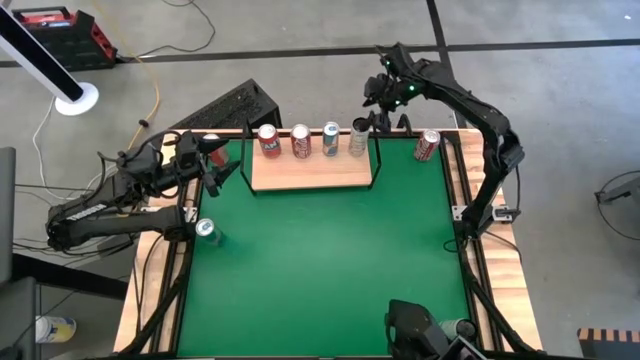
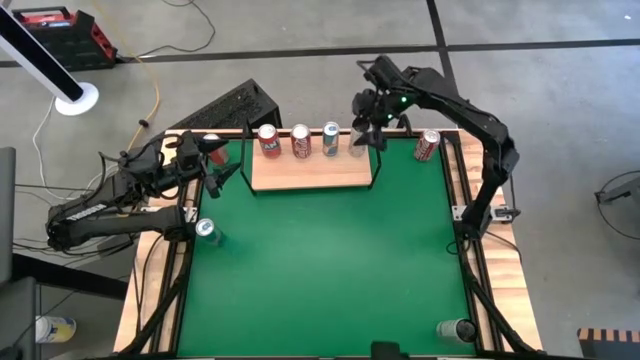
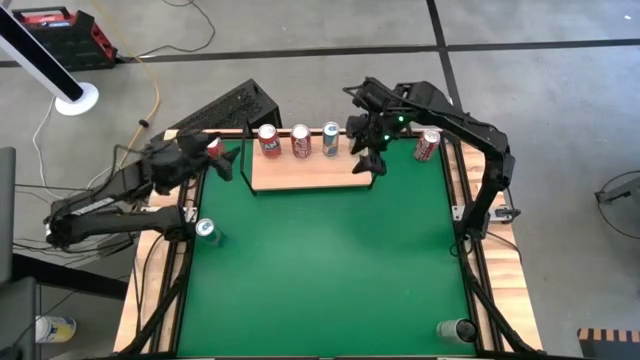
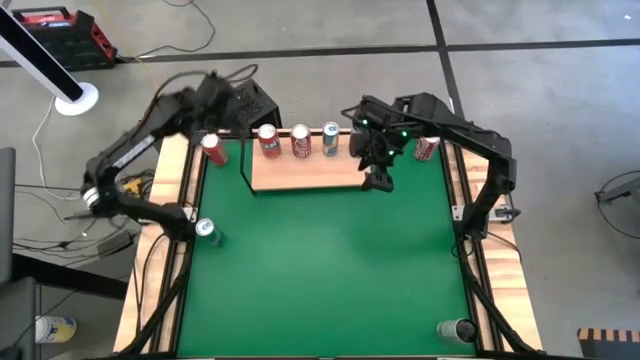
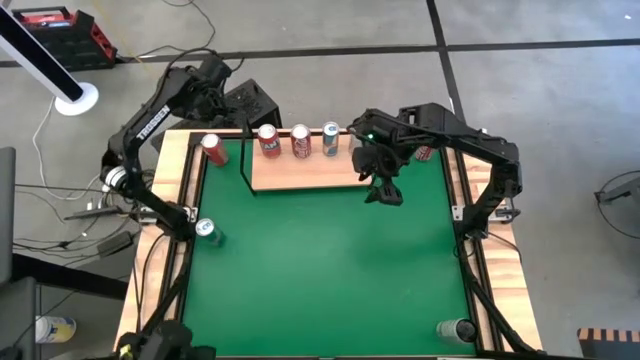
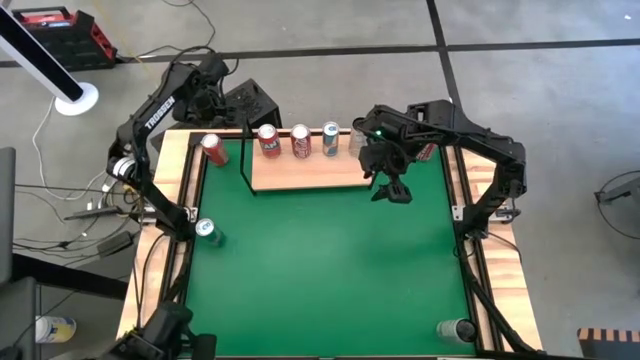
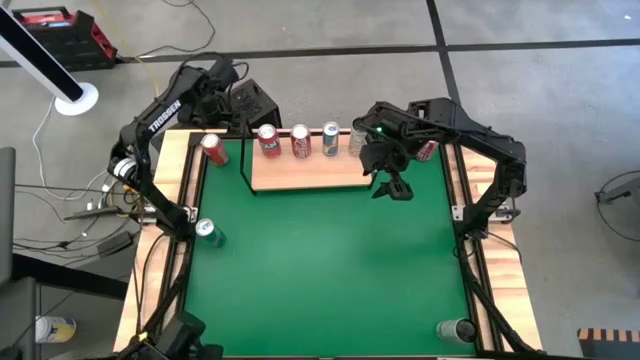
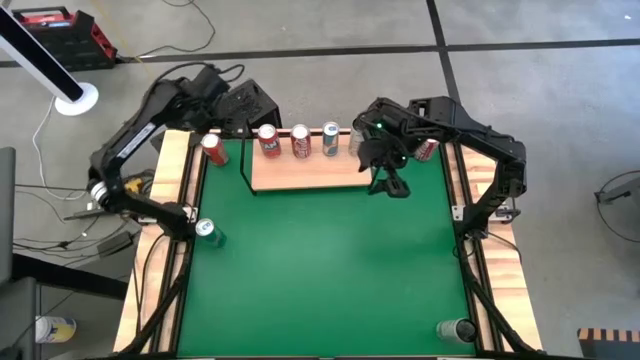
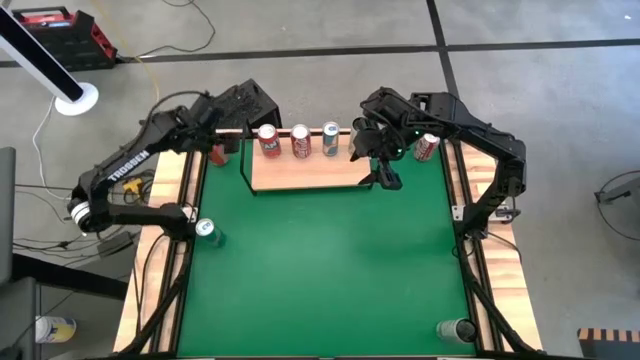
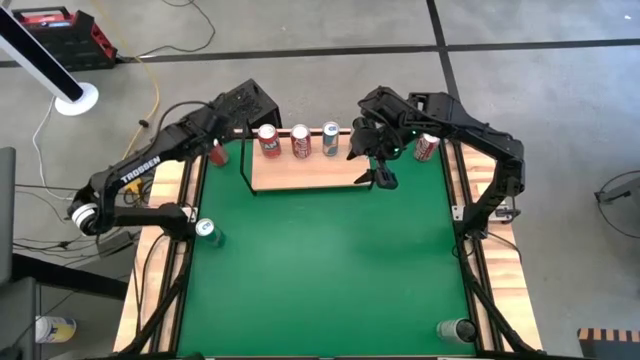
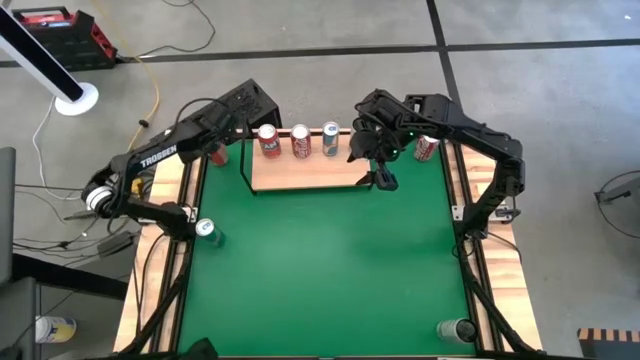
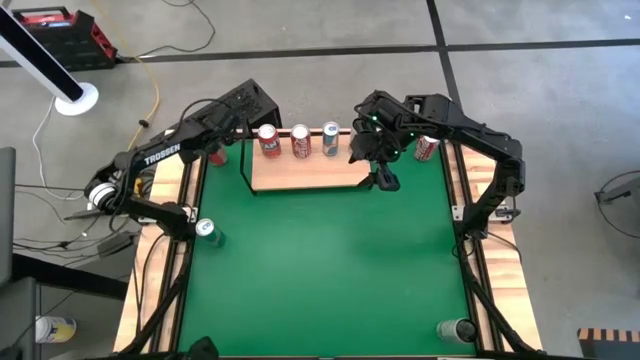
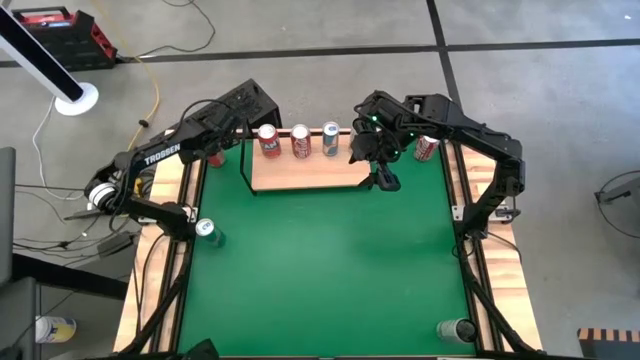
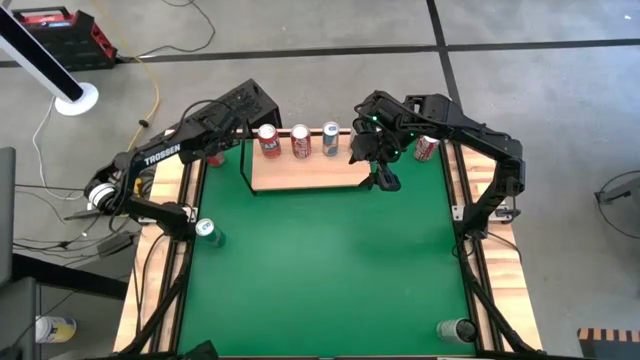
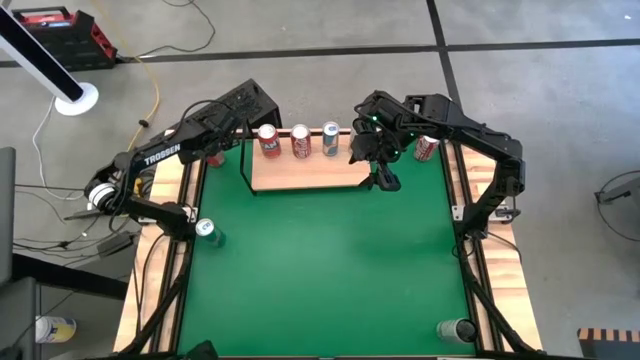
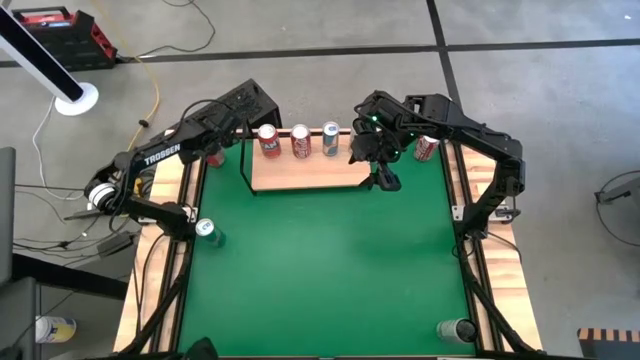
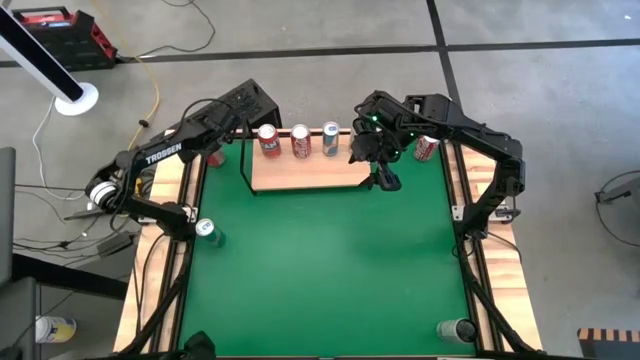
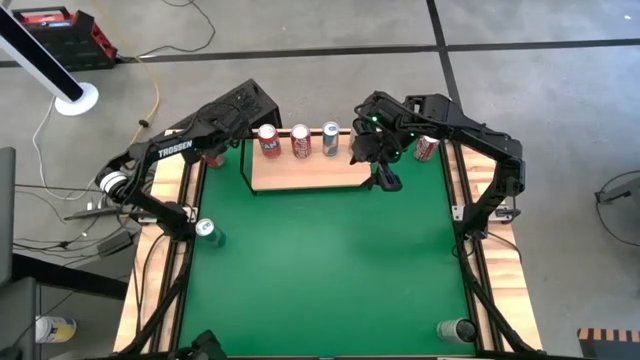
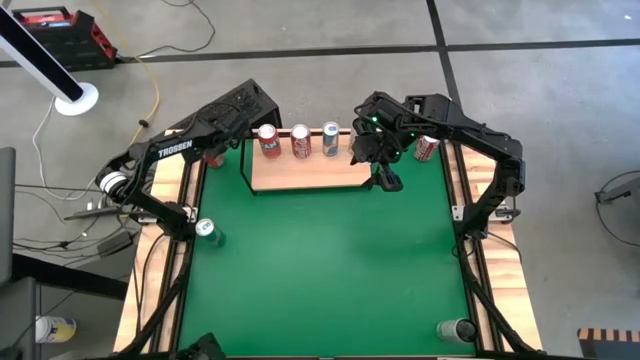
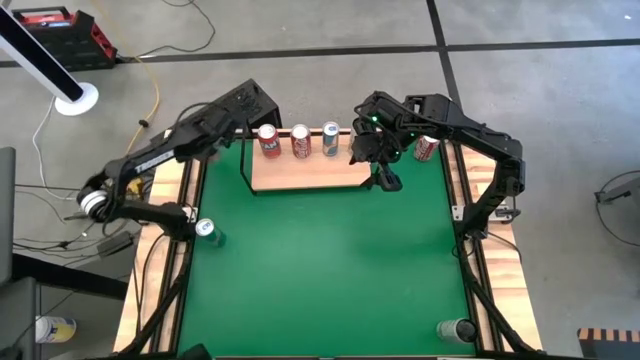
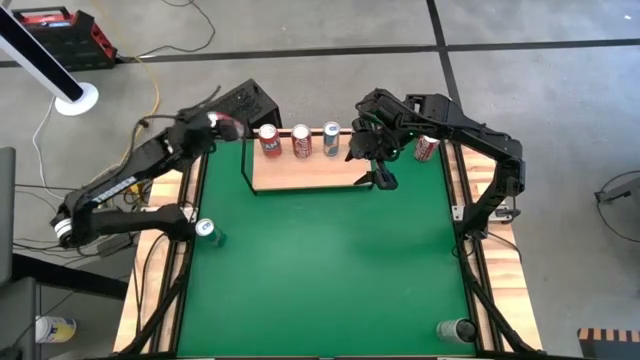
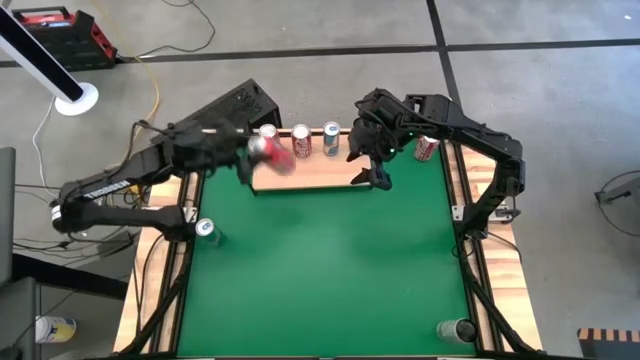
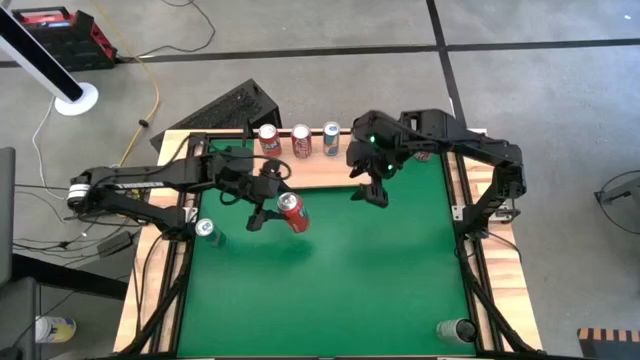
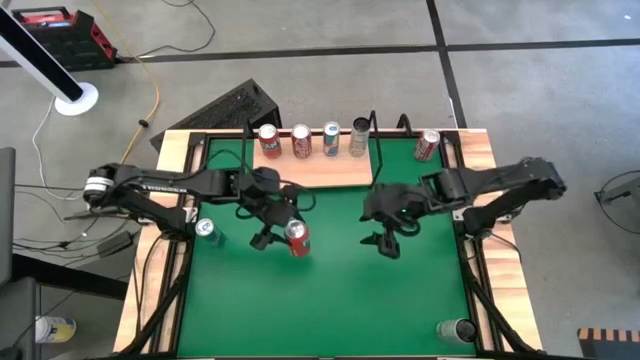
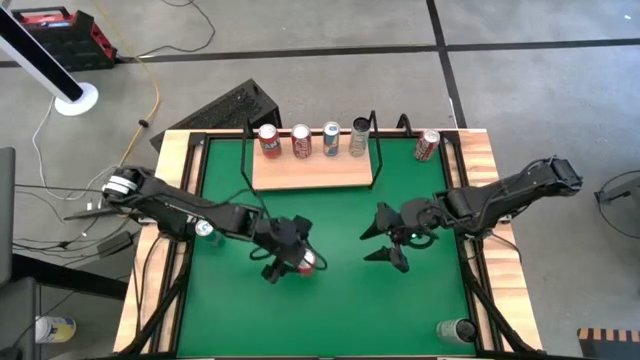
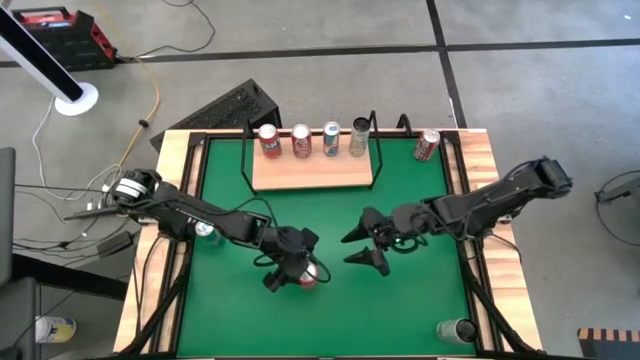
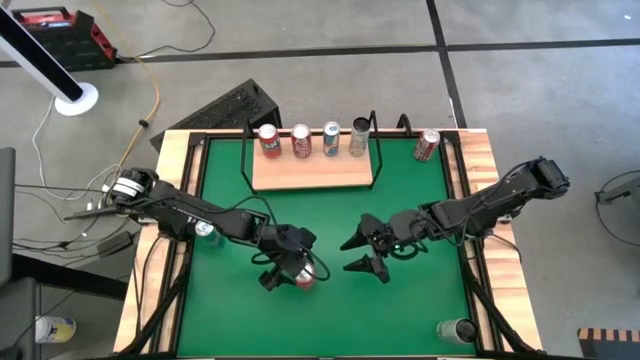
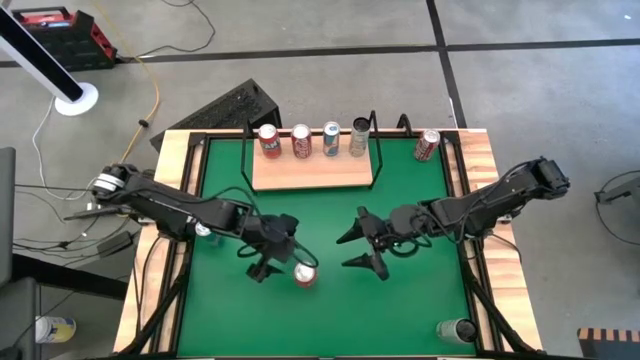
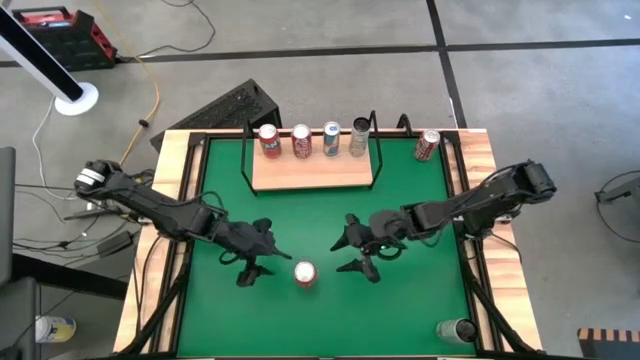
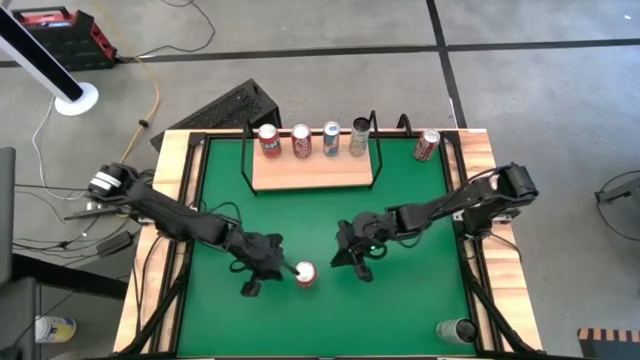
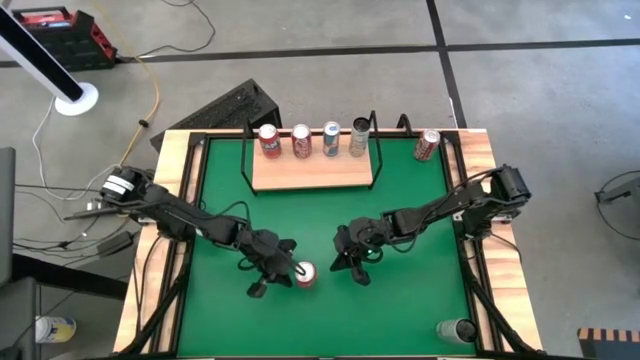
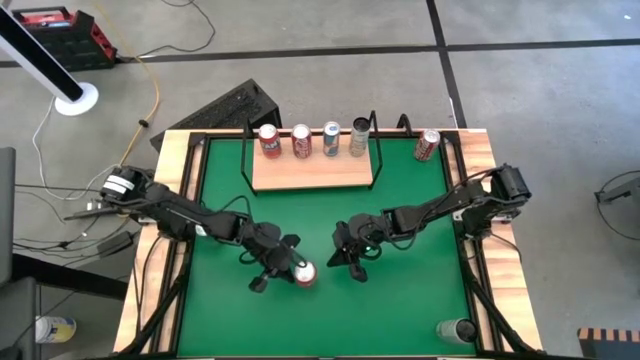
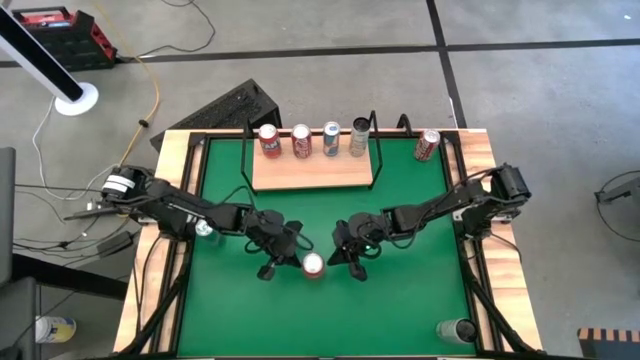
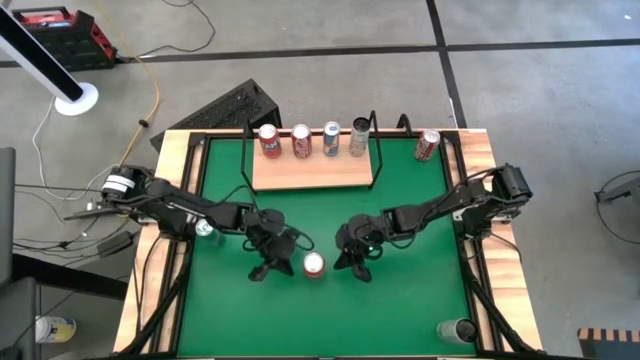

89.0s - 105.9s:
Task: Place canned beverage on shelf
Put the orange soda can, aligned with the other orange soda can on the shelf

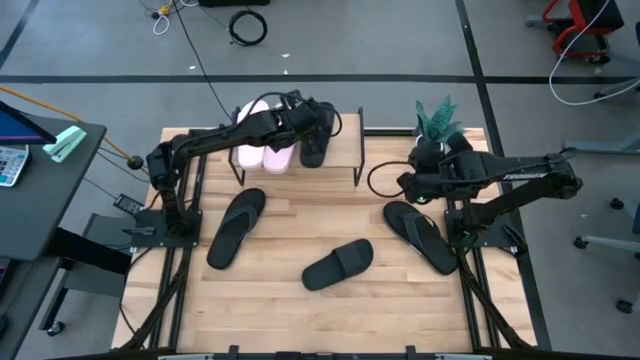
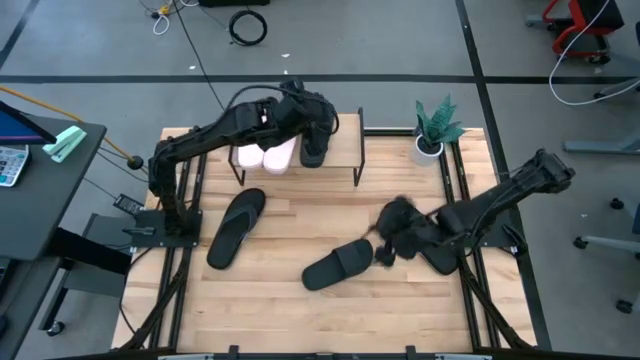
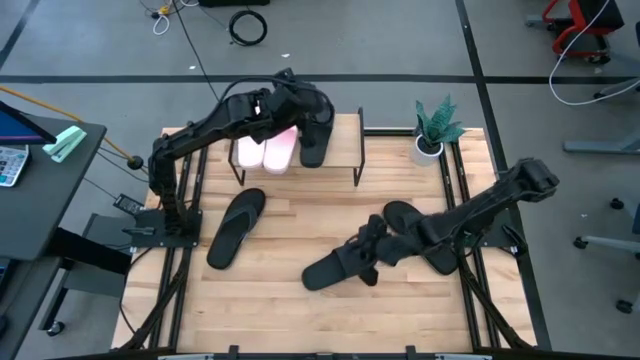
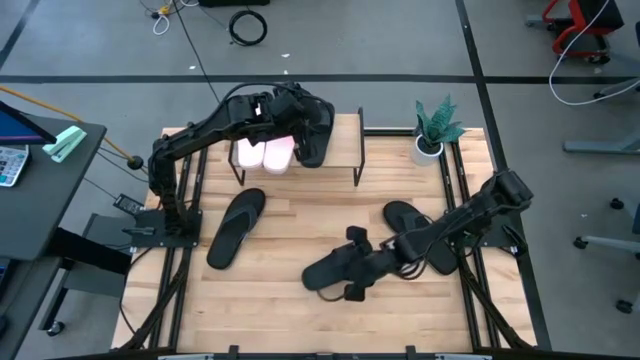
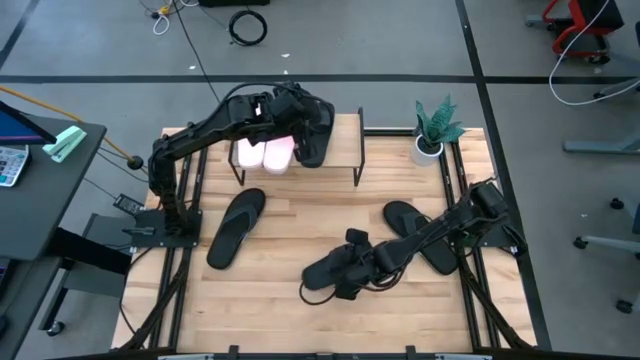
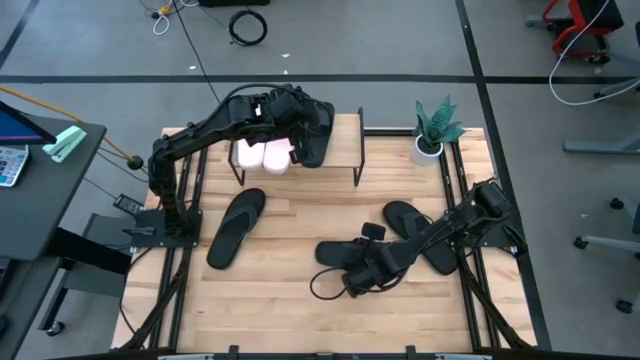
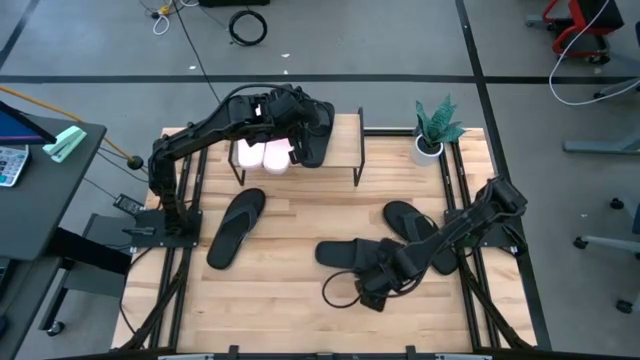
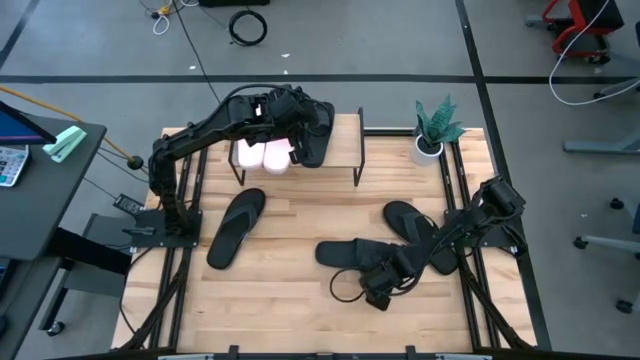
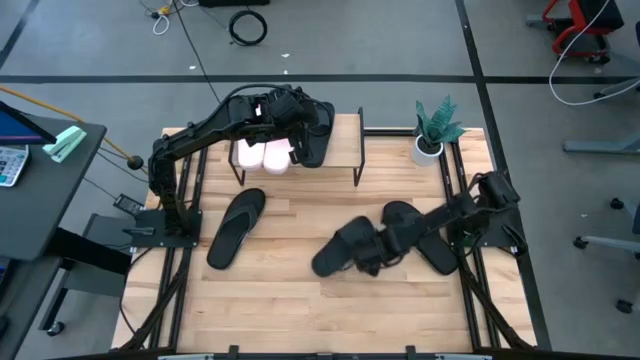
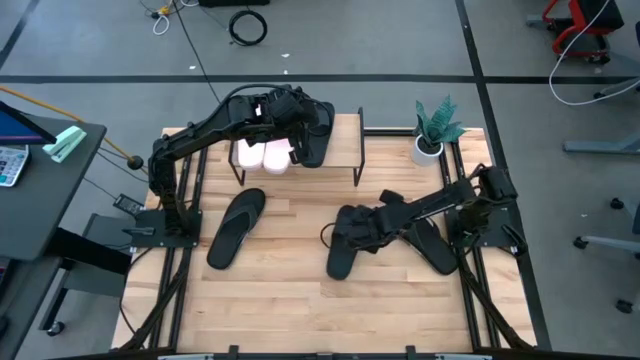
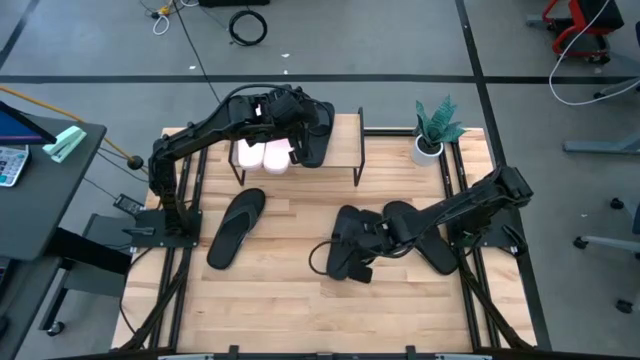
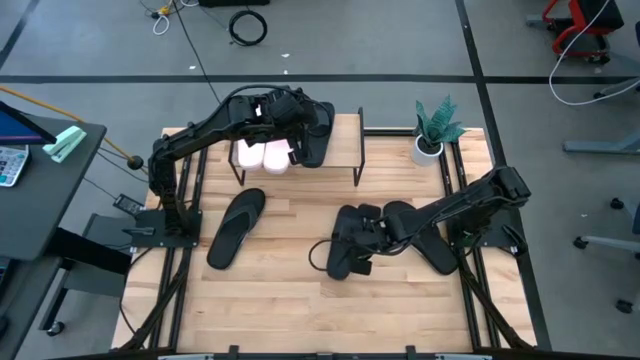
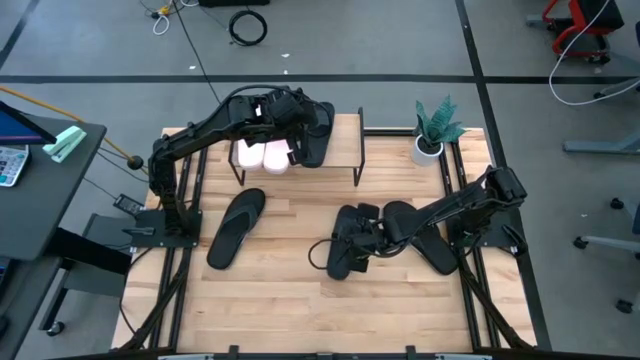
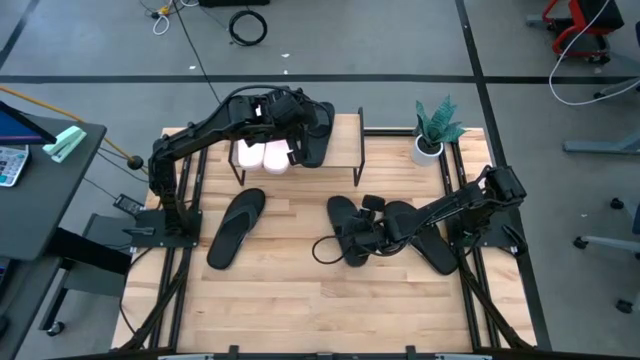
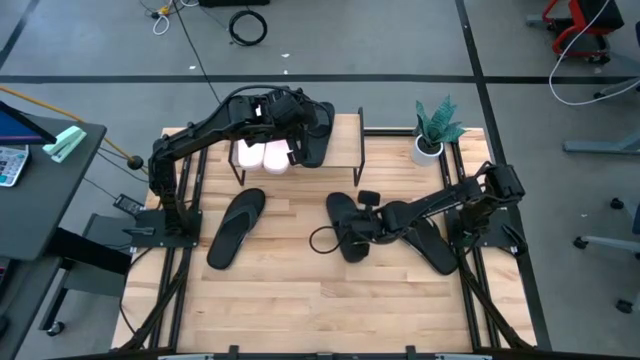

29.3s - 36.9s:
Task: Pick and place slides into the shelf
Put the middle black slides on the shelf aligned with the pink and black slides
